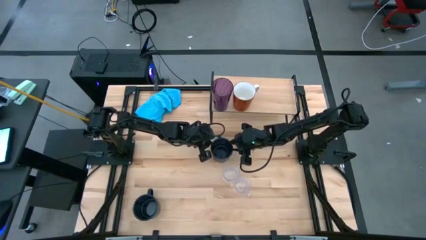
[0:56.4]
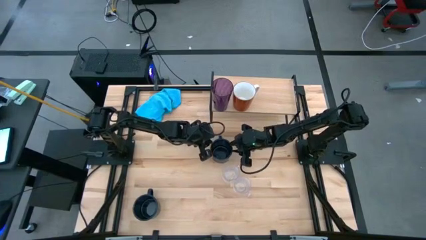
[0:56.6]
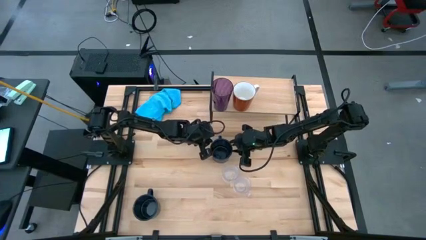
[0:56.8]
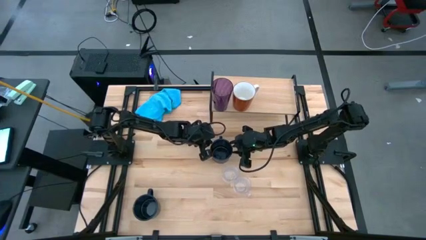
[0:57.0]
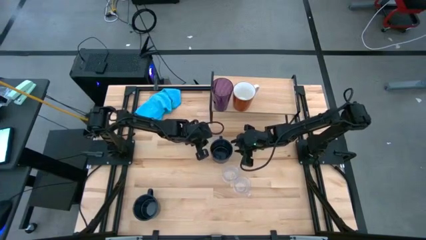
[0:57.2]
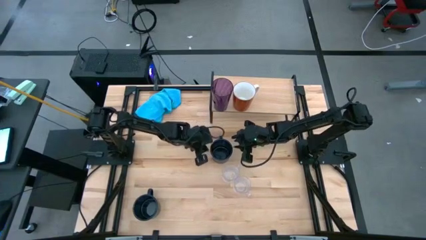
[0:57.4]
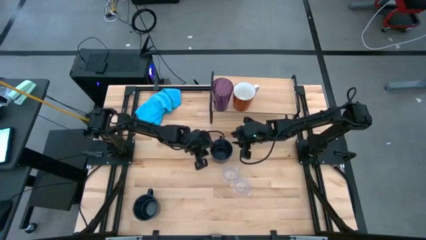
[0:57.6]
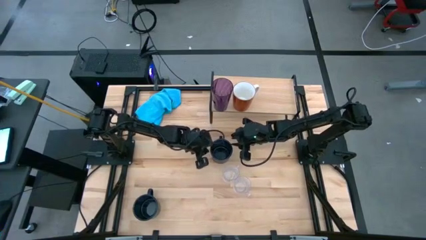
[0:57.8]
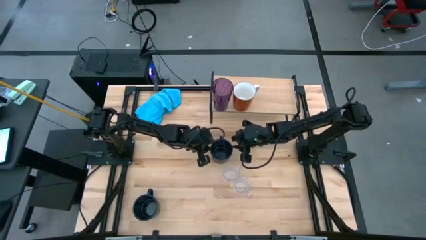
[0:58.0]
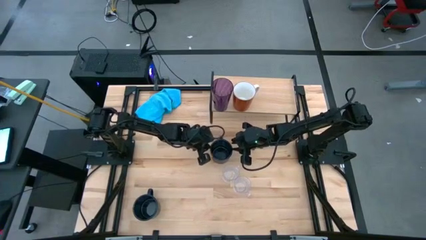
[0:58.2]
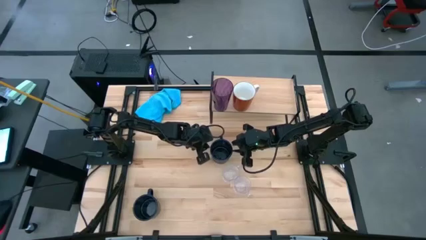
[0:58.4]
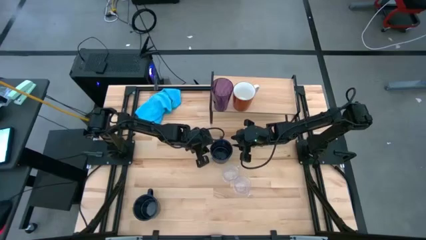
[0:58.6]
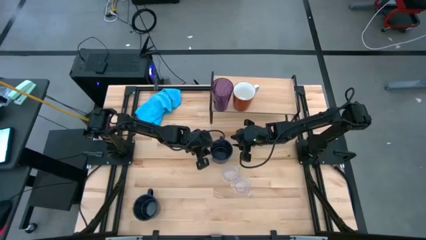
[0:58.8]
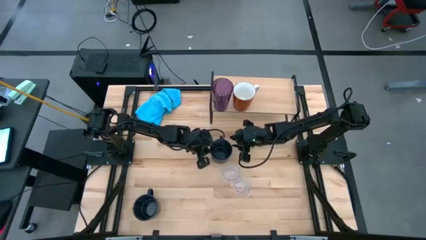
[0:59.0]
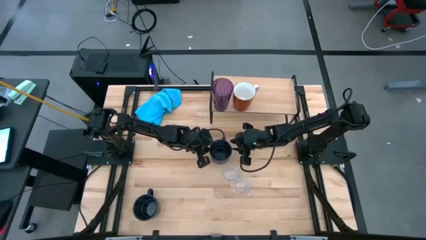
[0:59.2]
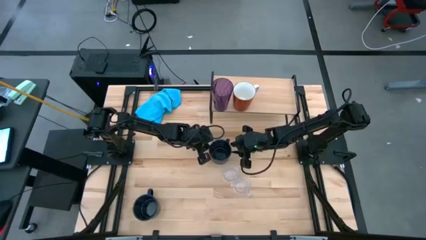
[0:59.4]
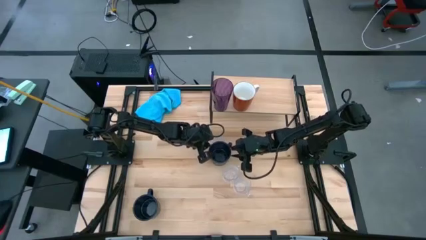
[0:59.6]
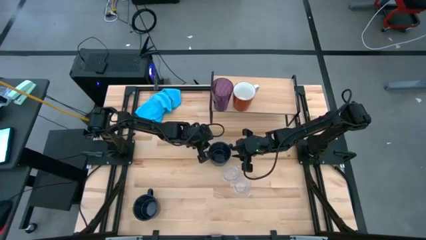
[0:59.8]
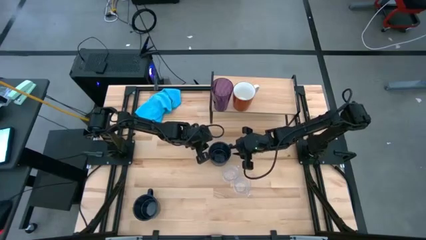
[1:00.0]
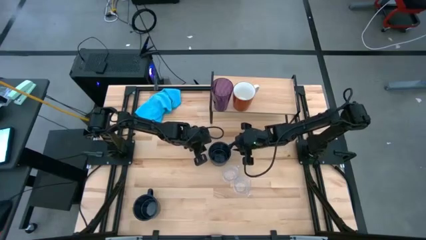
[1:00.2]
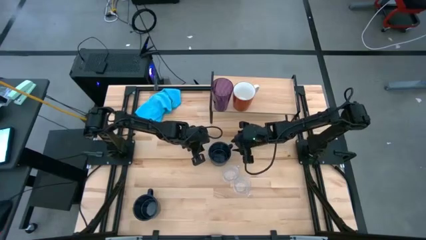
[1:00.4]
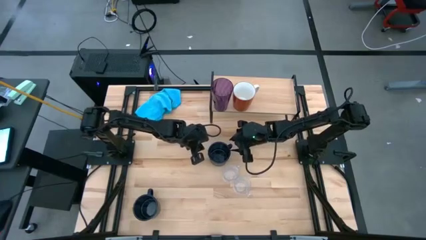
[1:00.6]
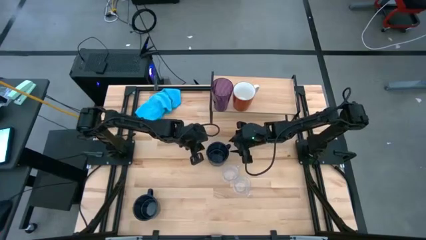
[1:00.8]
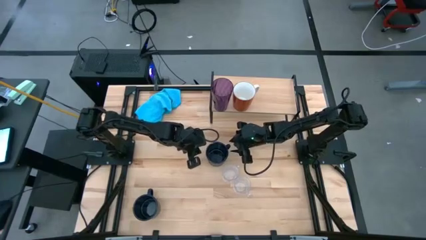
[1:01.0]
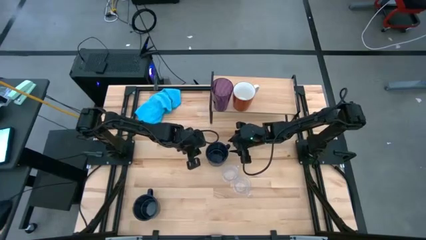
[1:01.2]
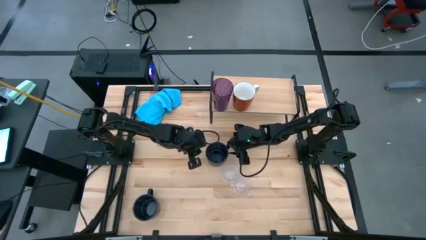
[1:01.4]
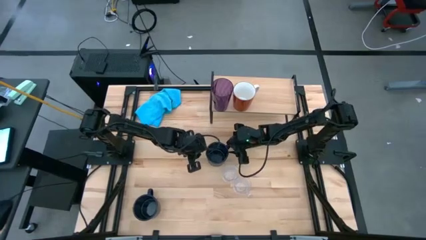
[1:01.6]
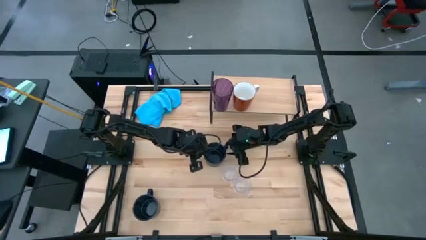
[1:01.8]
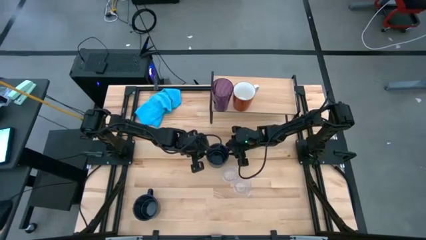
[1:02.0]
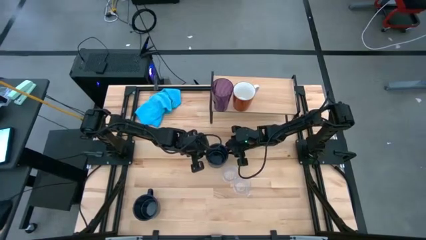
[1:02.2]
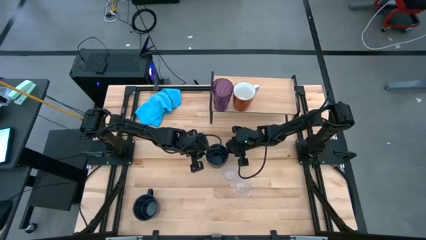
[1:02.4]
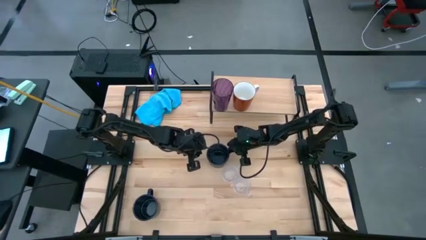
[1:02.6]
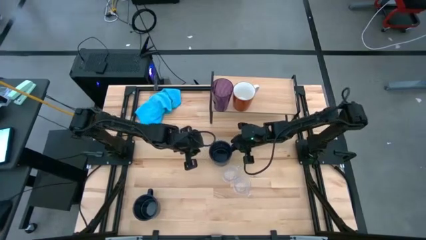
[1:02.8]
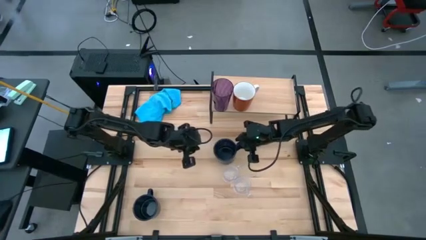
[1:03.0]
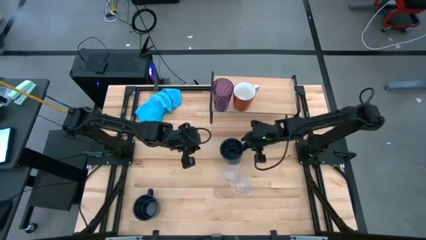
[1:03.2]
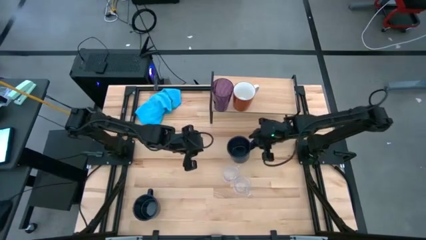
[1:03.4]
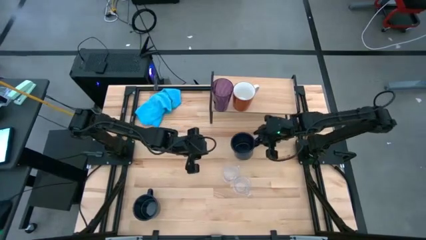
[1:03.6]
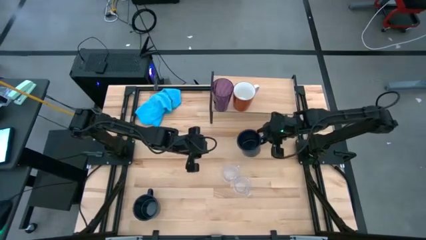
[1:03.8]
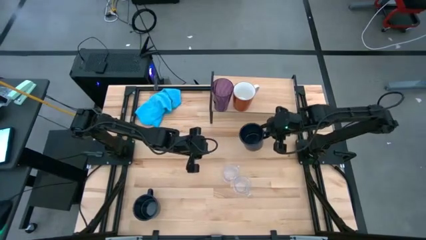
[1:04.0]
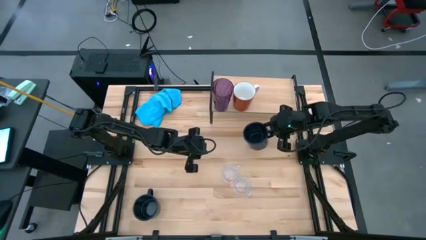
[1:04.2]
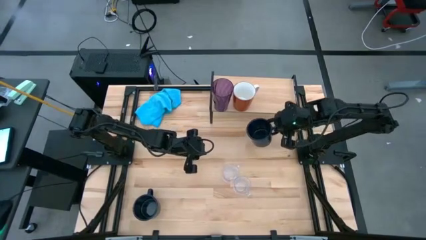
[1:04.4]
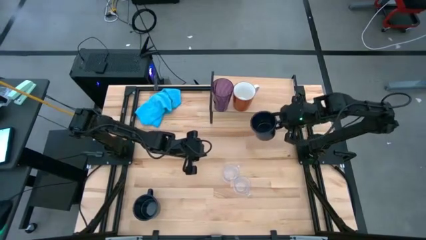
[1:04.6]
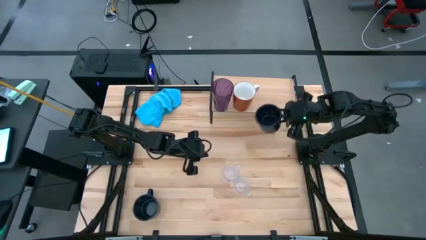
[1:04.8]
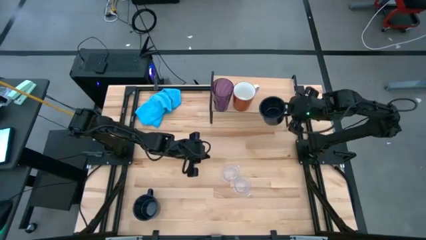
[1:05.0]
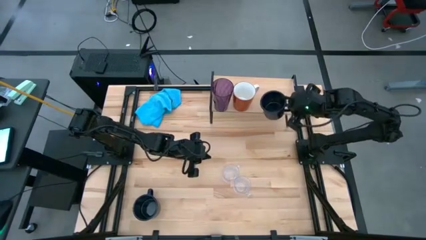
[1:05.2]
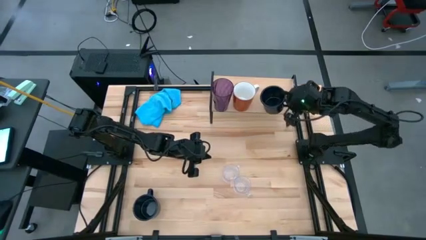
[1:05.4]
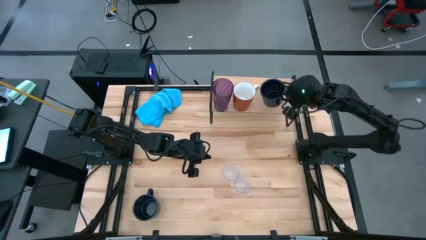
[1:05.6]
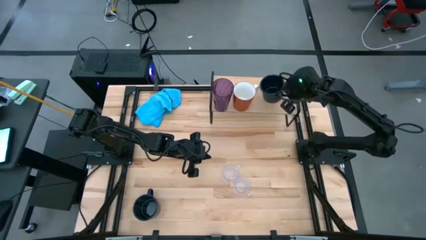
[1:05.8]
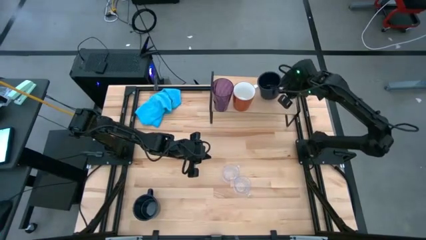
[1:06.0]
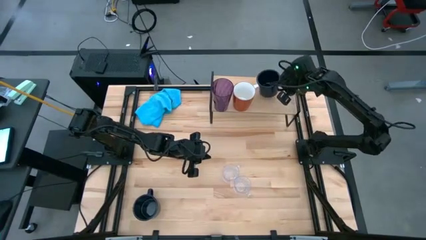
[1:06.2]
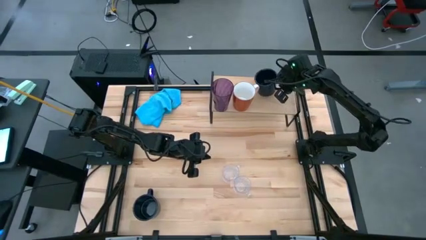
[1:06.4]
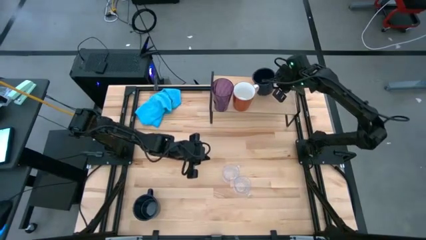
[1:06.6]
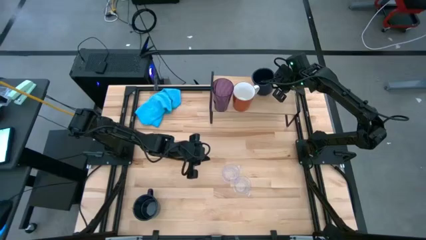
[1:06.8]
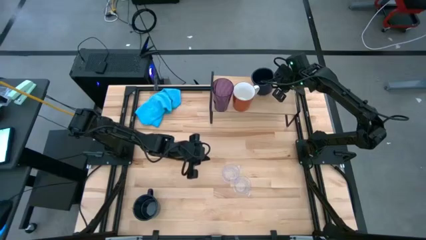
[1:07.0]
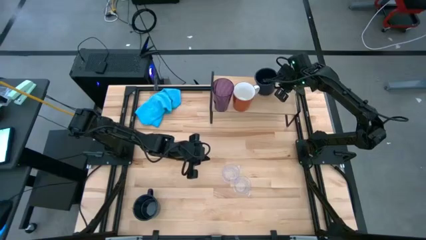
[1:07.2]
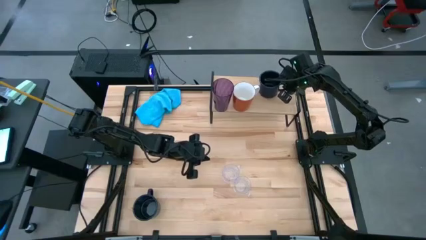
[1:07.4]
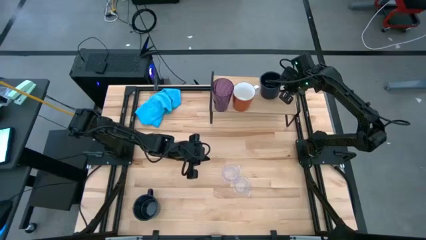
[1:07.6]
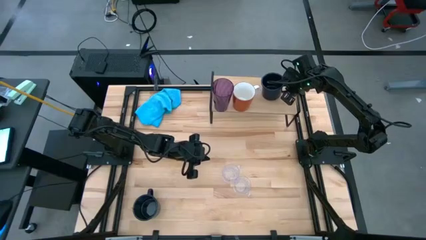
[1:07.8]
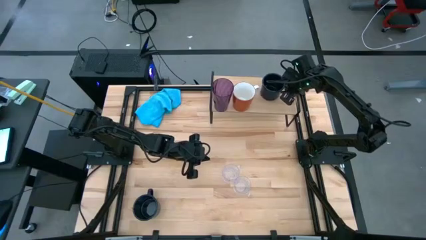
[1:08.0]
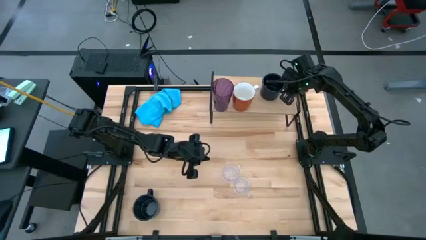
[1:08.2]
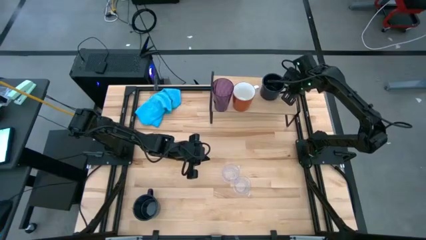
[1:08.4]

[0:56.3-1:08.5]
Task: Stack small to large cups/mugs on shelf
Put the right black mug on the shelf
